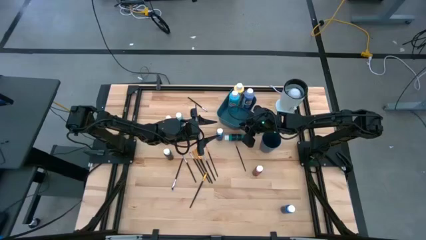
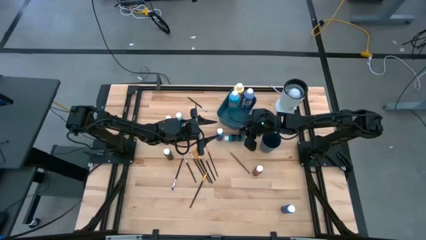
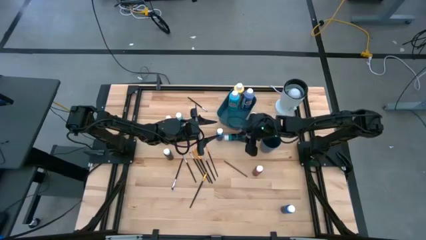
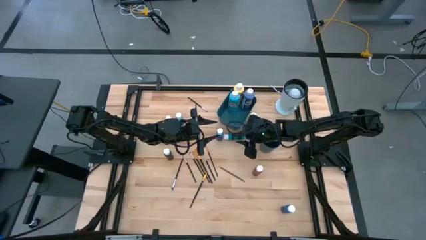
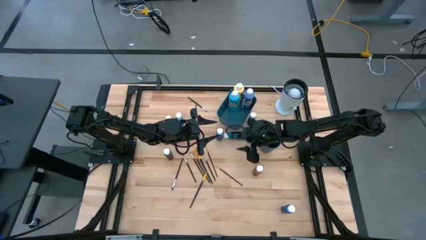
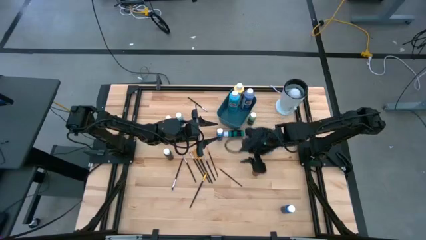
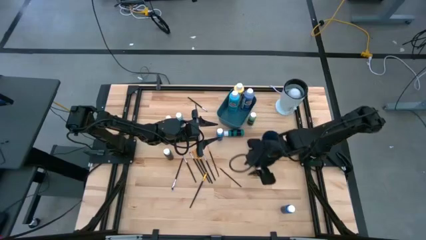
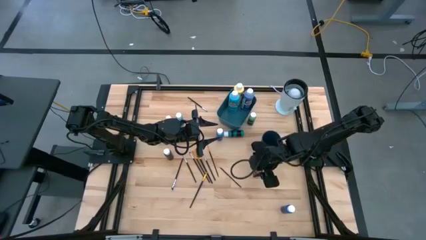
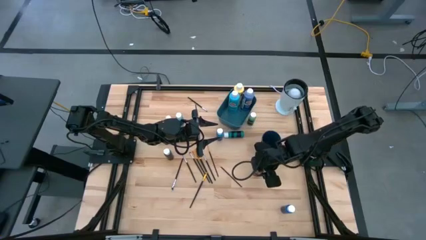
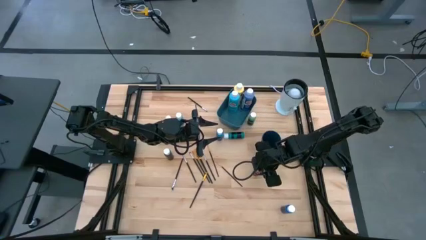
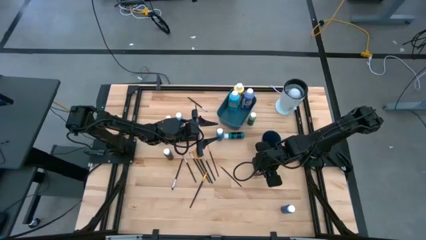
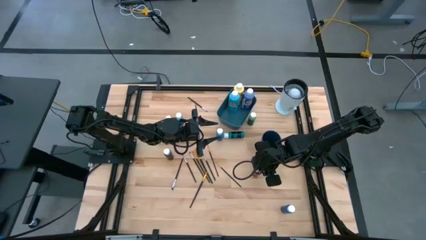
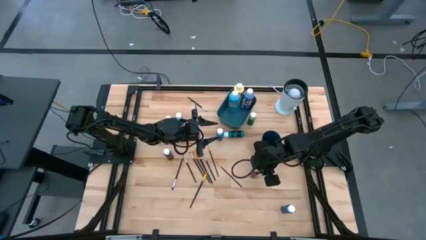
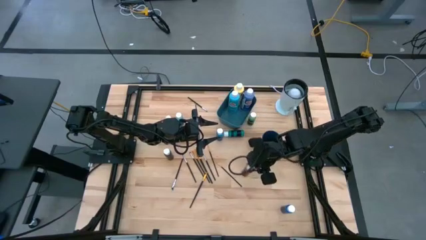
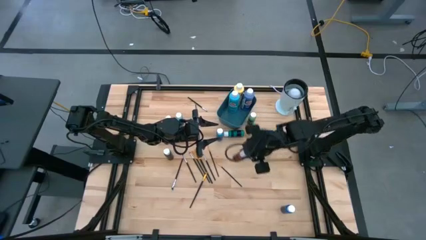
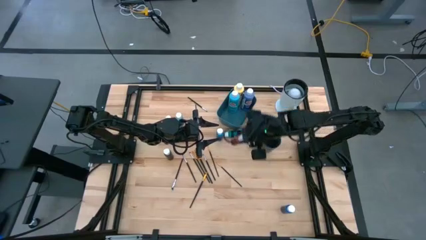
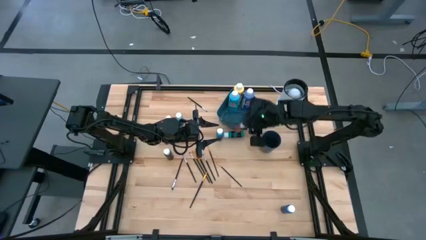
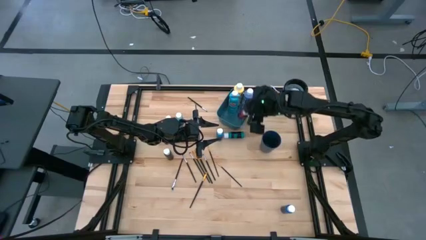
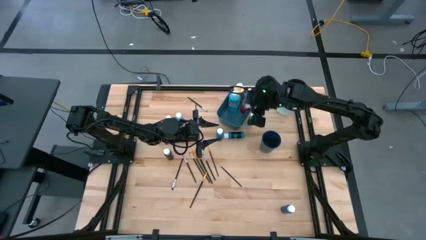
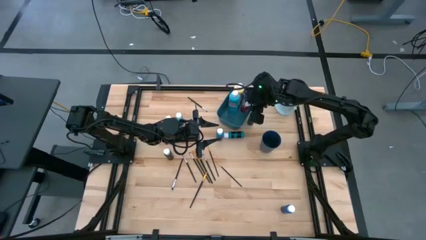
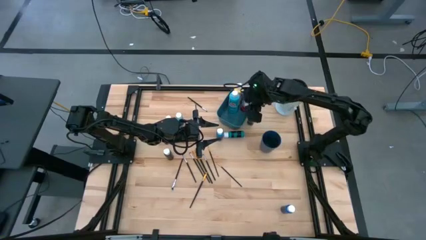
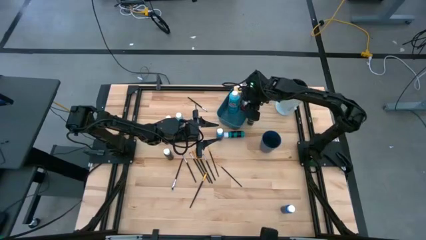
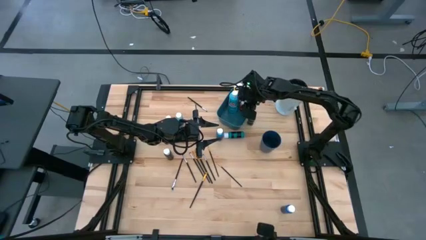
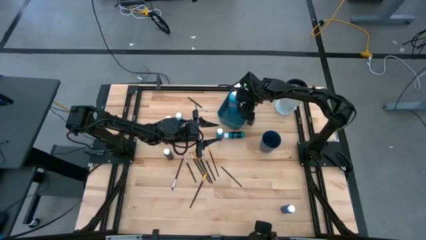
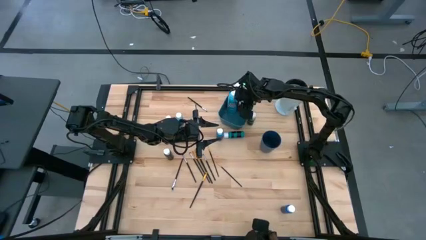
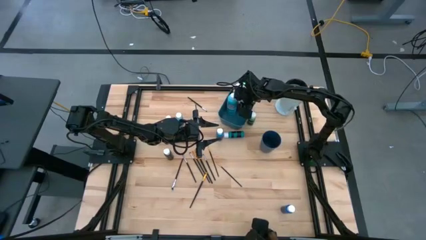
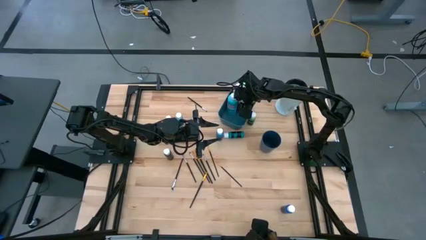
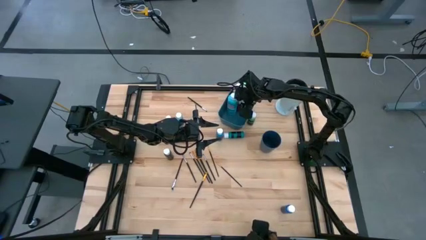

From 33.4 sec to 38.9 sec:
Task: Pick & Place Paint Supplies
Put the red paint bottle into the blue bin

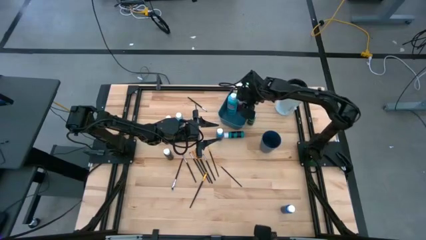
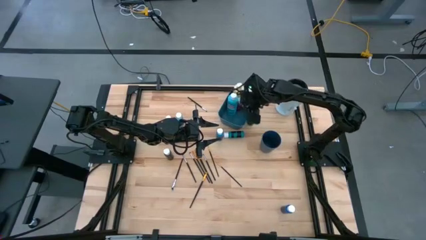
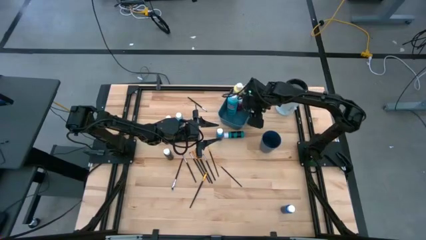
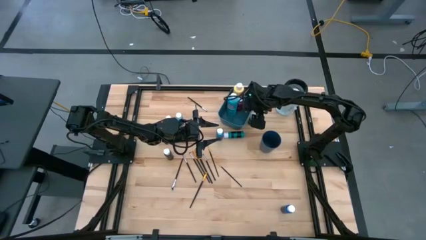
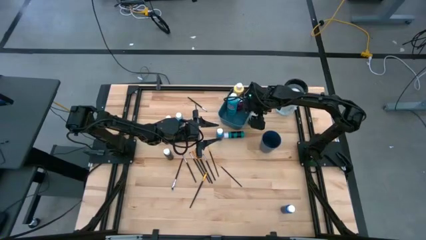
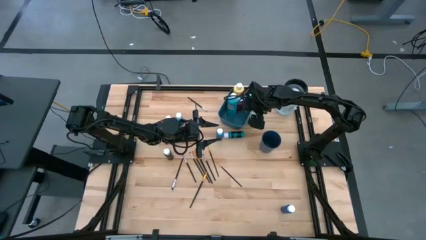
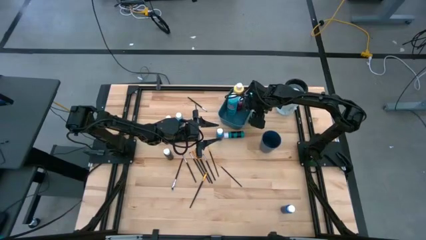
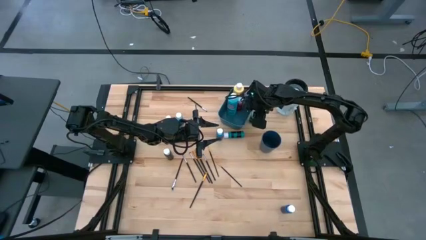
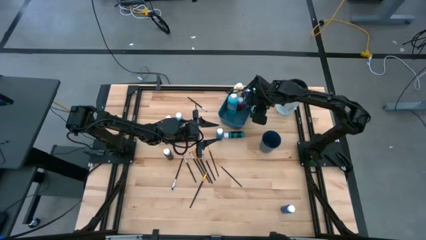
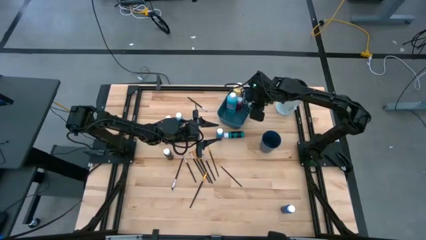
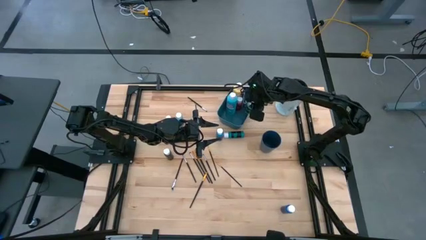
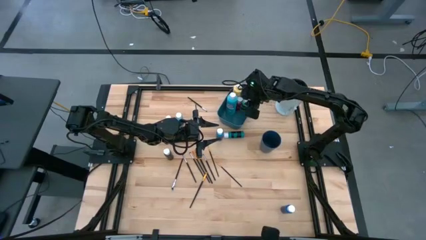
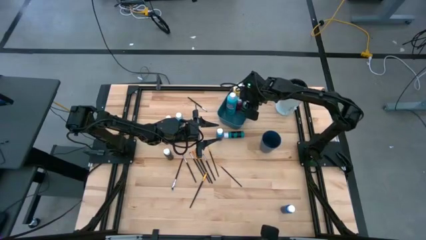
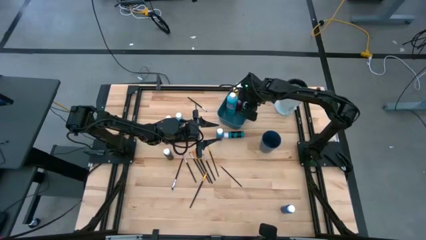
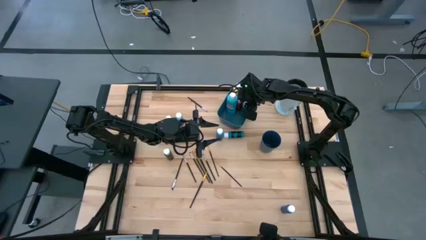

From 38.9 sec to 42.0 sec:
Put the light green paint bottle into the blue bin

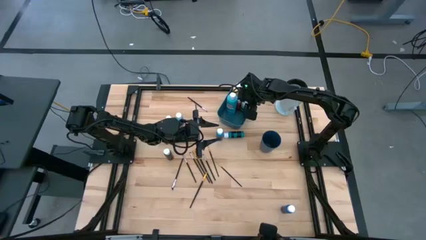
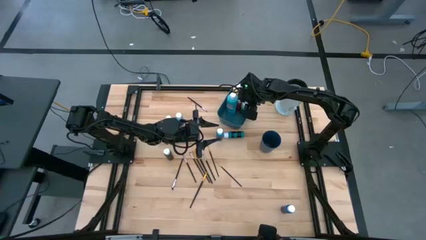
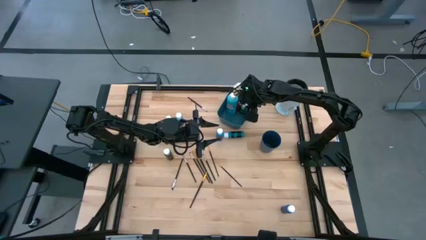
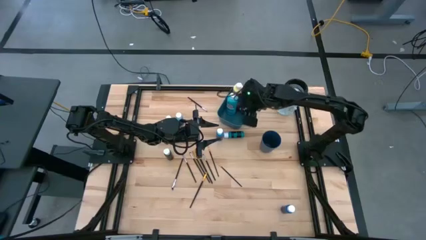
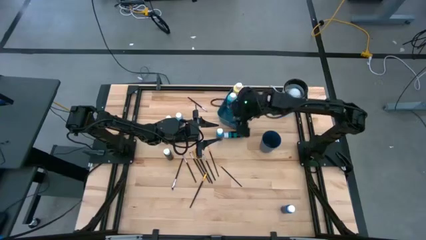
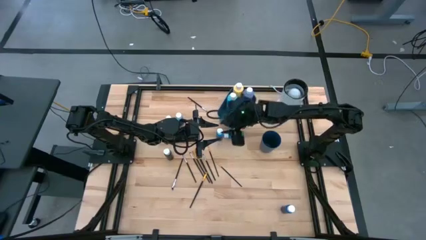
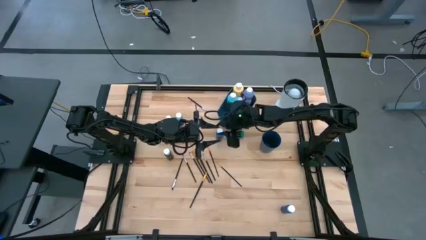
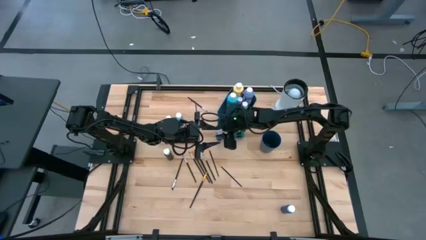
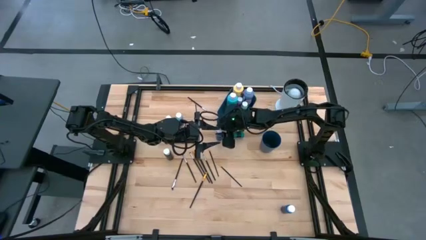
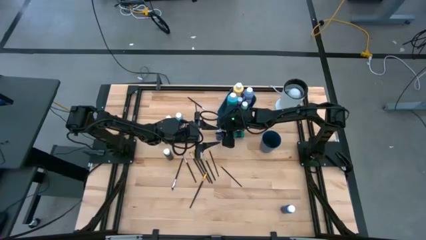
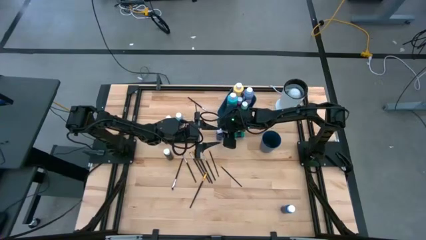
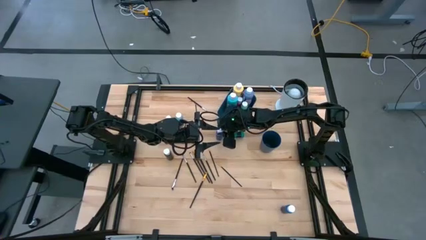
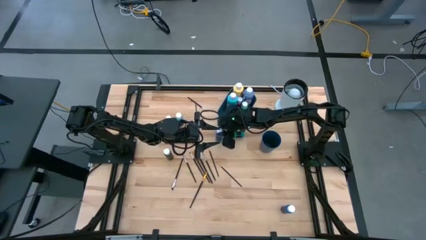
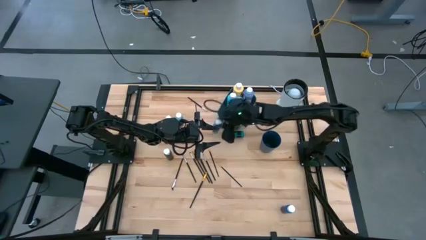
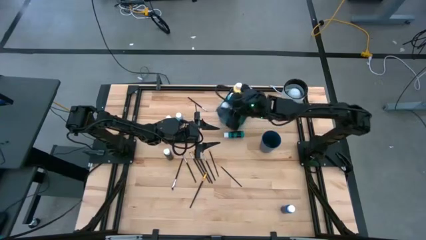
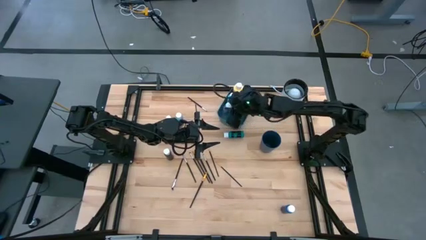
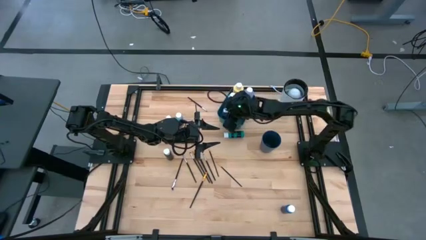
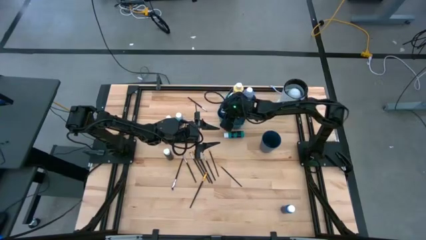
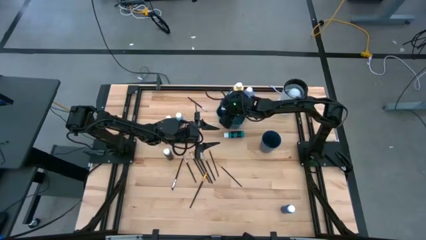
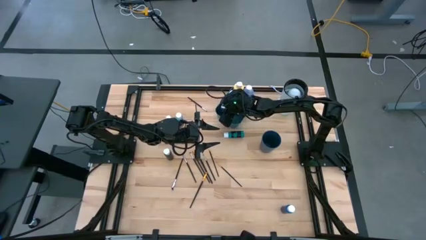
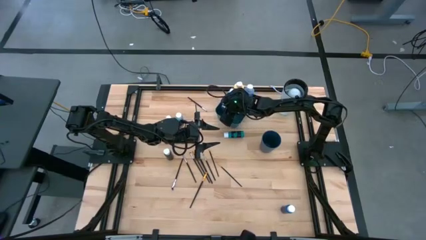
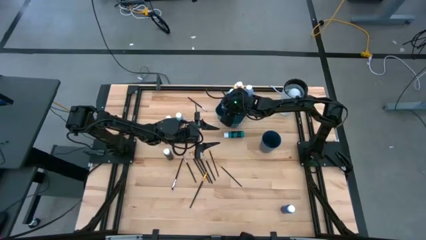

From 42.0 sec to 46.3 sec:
Put the blue paint bottle into the blue bin

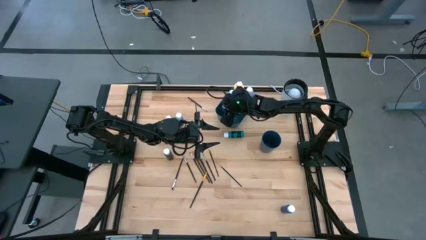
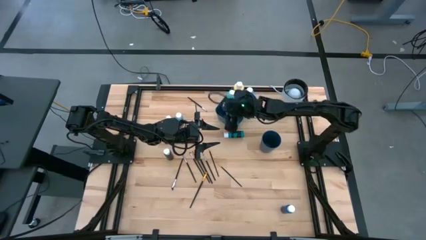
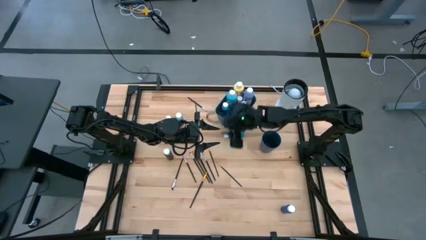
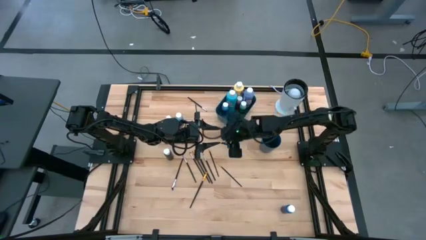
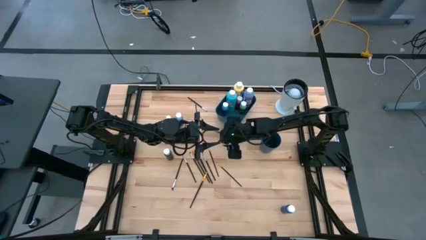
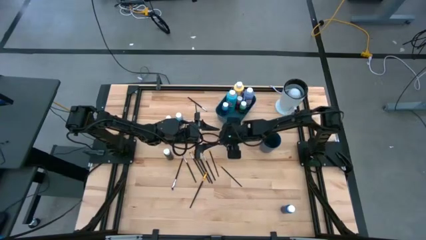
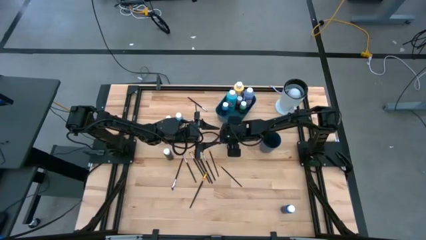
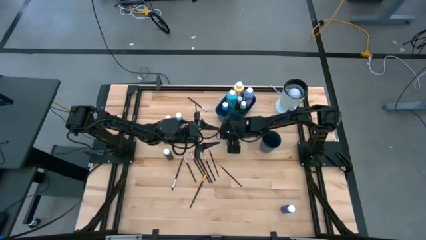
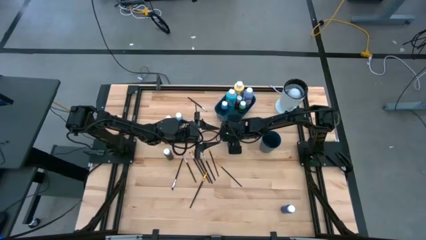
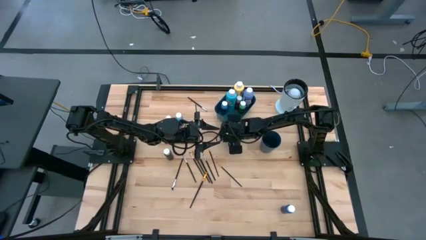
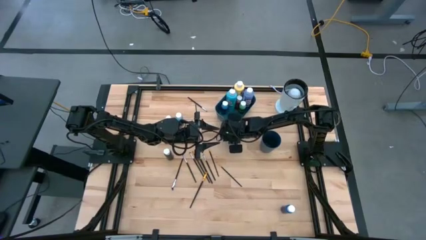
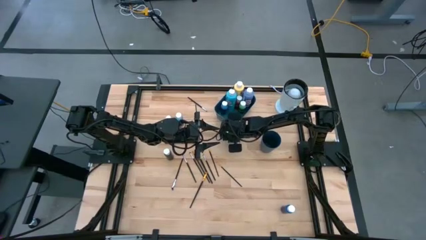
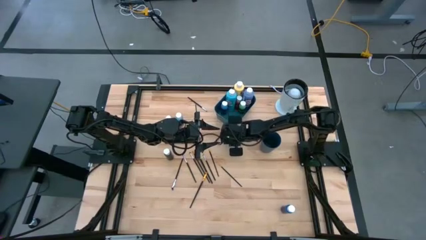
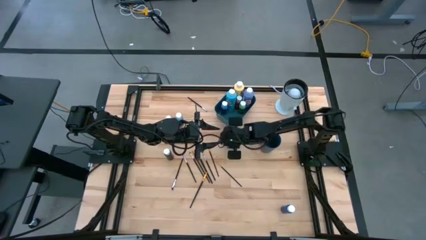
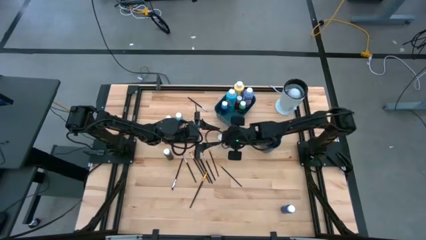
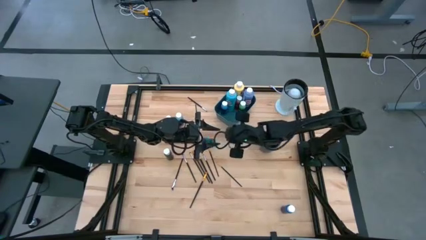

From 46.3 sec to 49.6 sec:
Put the green paint bottle into the blue bin
